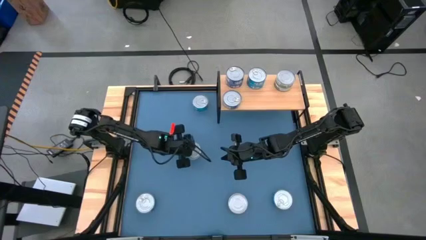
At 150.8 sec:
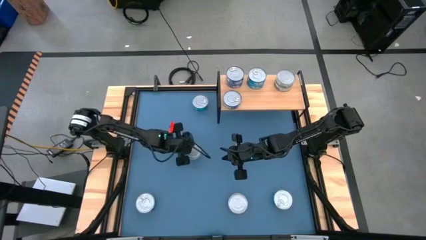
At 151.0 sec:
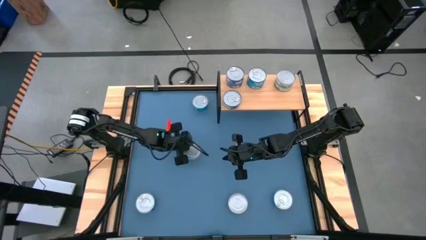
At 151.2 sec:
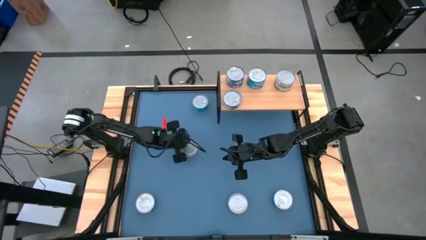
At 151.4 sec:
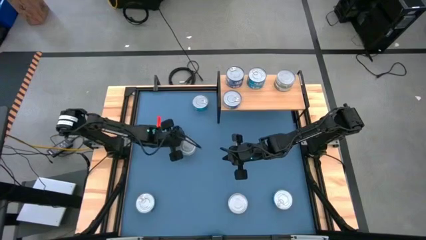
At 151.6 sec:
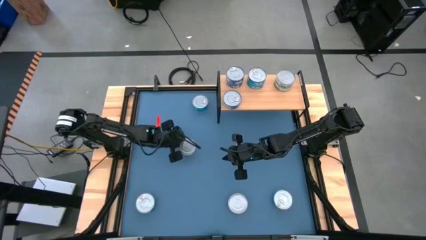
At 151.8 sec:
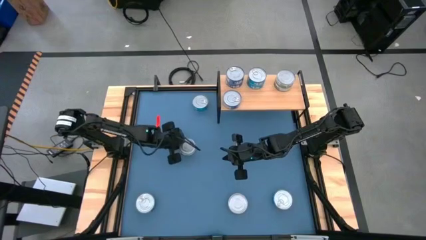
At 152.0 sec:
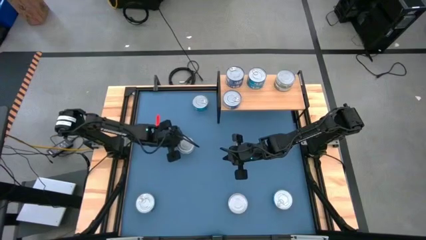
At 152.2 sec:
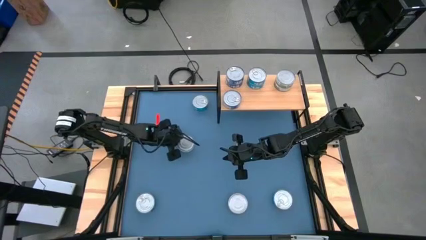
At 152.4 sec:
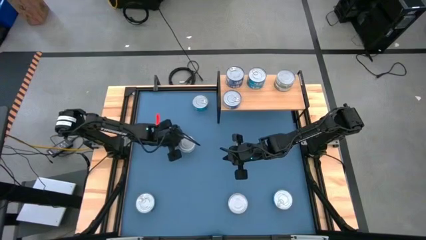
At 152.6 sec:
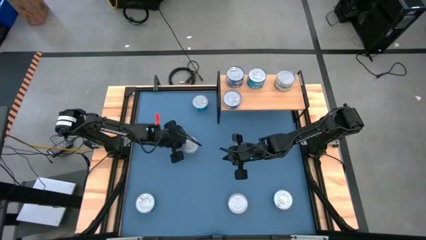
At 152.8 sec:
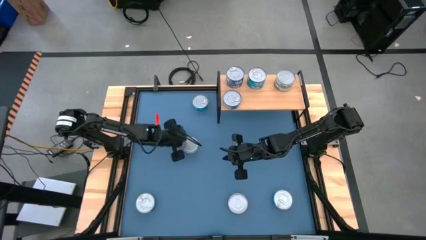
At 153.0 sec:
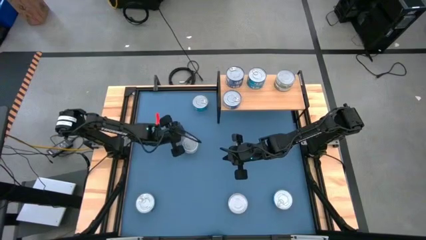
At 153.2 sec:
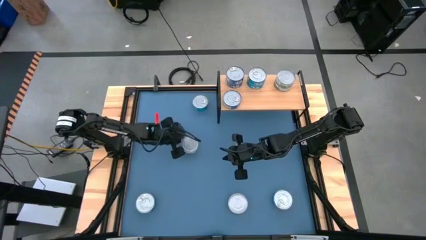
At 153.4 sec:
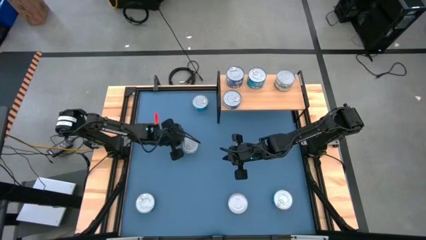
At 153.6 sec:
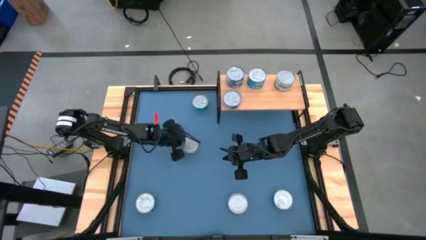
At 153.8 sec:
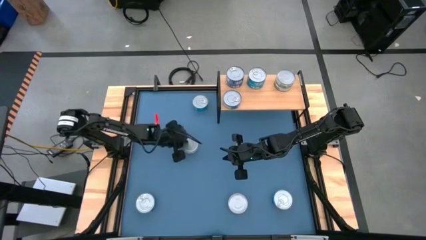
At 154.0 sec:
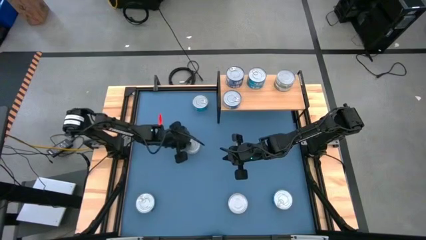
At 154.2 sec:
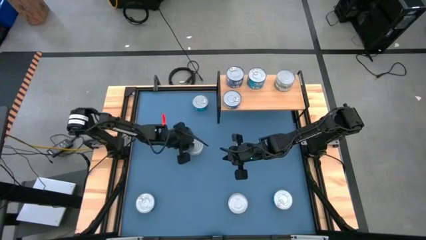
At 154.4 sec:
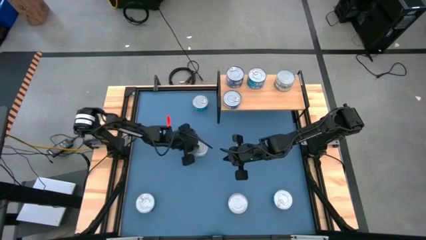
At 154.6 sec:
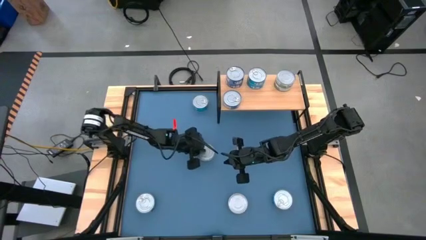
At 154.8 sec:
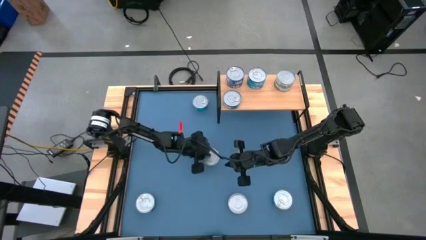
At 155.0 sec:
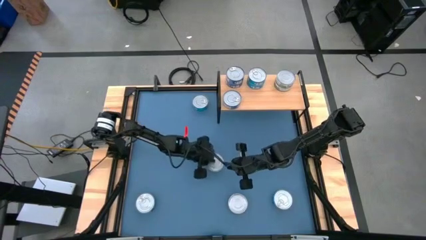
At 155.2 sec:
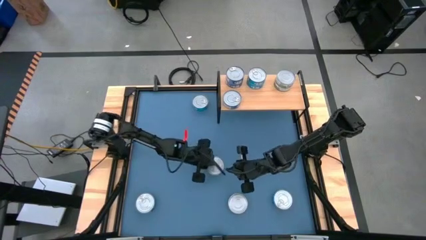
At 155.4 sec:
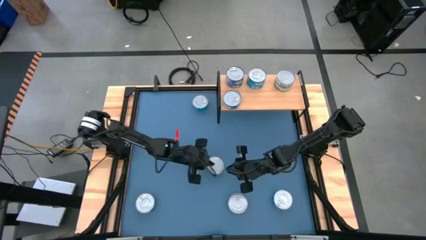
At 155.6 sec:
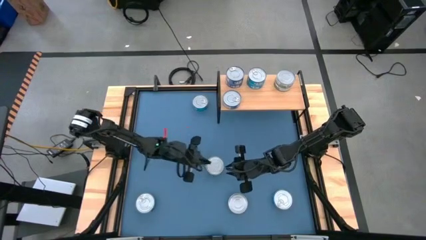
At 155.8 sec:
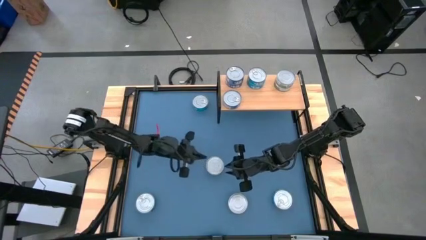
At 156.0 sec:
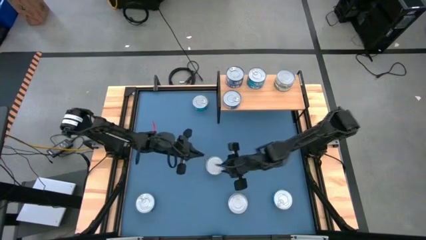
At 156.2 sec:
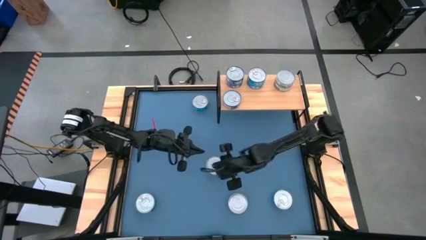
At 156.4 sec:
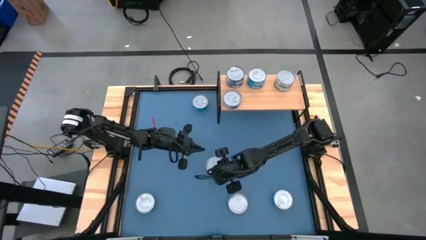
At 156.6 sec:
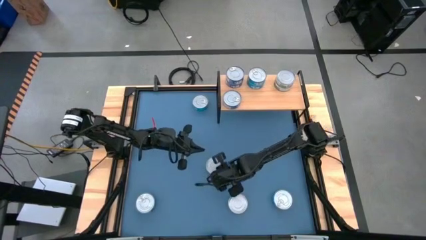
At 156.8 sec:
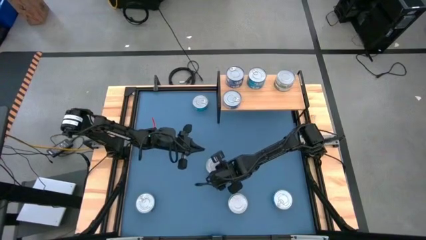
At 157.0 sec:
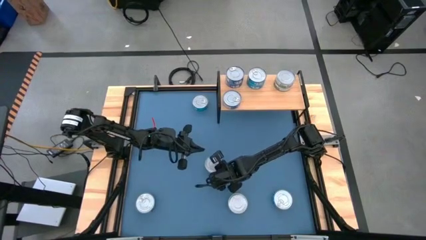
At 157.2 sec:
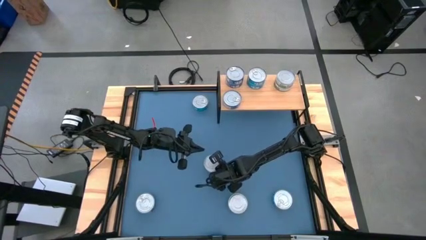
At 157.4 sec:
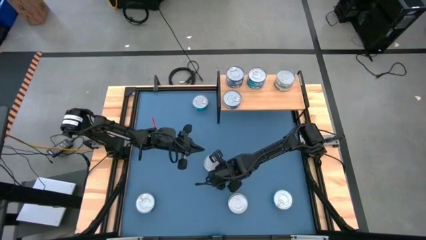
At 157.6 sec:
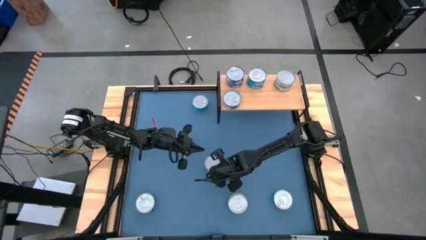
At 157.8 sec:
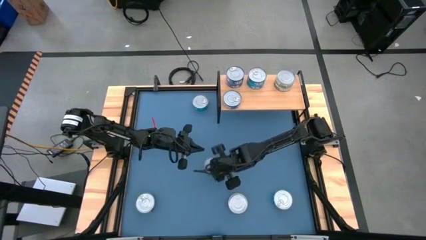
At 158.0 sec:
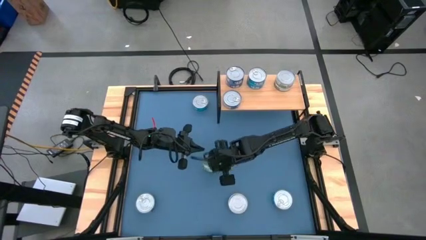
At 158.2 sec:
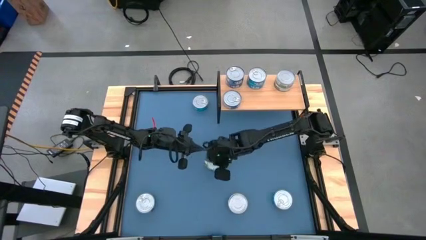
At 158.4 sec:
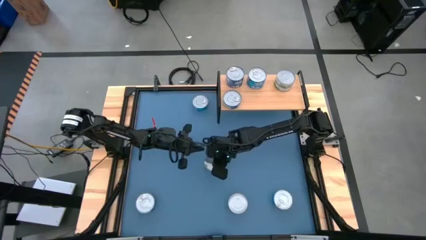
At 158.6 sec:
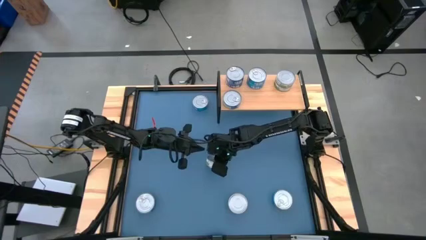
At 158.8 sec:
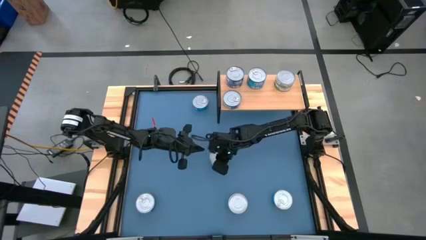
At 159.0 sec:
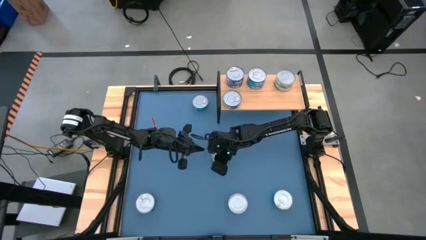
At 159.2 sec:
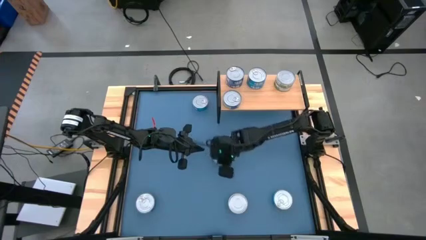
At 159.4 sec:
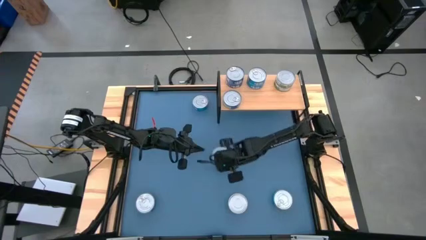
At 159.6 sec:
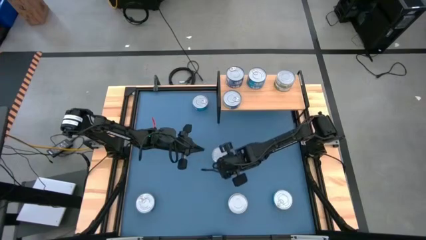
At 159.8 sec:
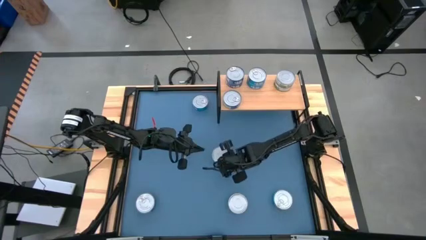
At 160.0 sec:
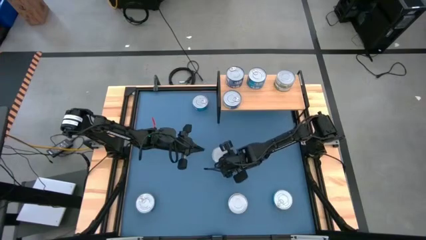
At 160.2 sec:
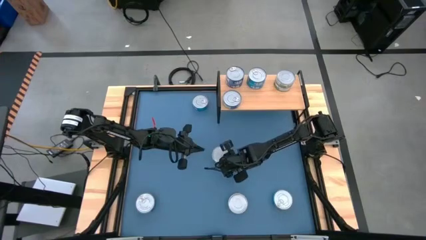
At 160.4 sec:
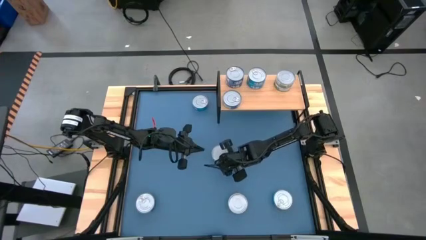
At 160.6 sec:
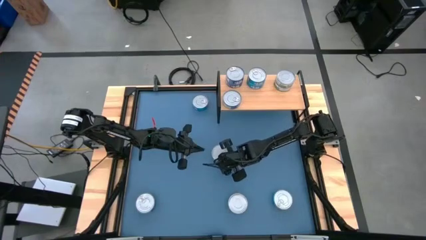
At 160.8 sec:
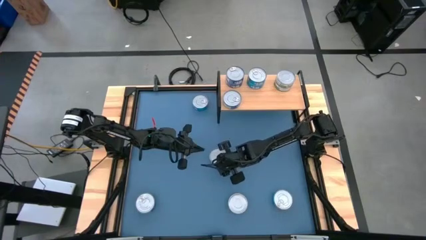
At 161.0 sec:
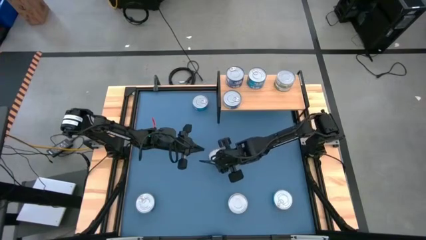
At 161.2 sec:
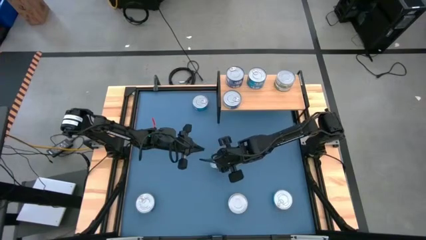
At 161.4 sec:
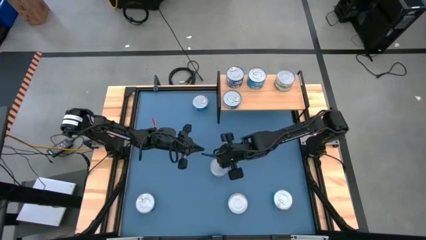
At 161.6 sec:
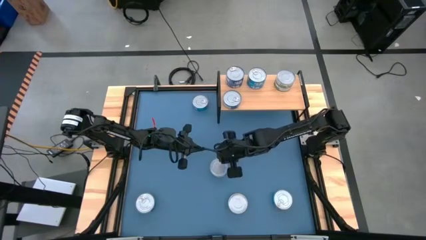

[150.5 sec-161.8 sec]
Task: Stack canned seafood by type on shelf
Put the left green tuna can on the shelf aligned with the other green tuna cans on the shelf

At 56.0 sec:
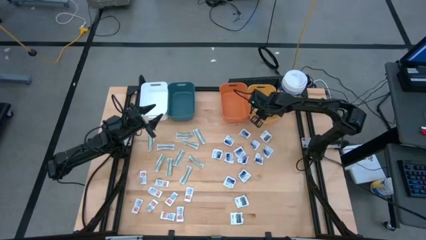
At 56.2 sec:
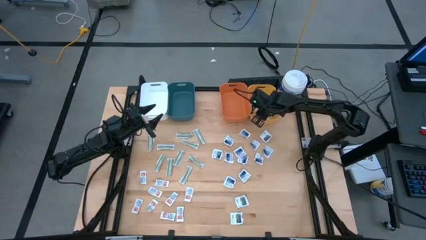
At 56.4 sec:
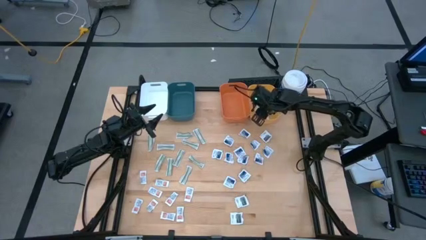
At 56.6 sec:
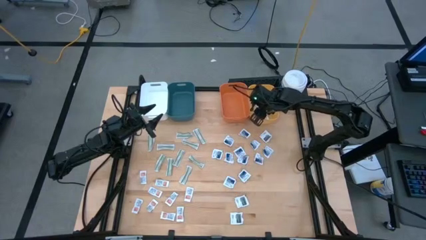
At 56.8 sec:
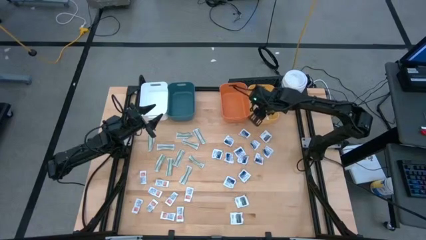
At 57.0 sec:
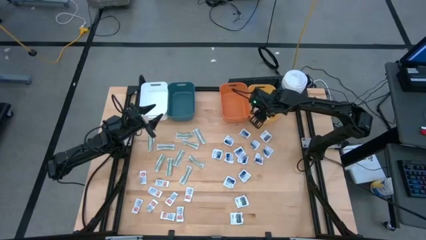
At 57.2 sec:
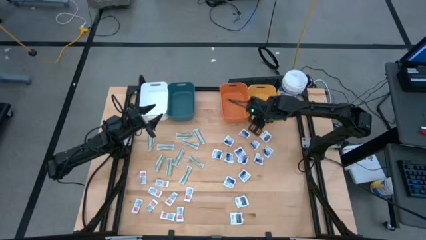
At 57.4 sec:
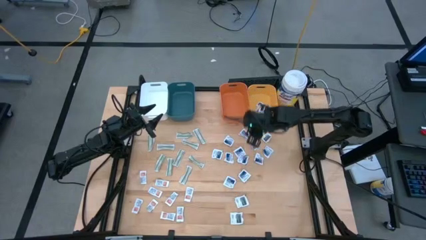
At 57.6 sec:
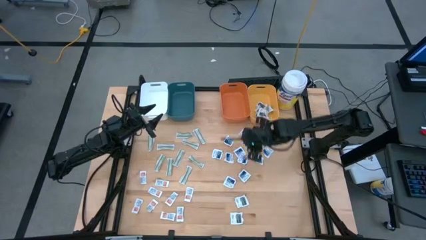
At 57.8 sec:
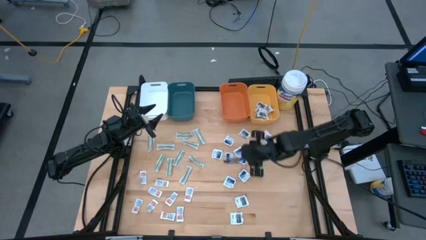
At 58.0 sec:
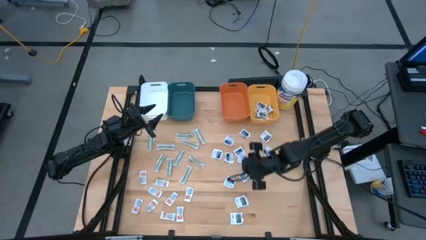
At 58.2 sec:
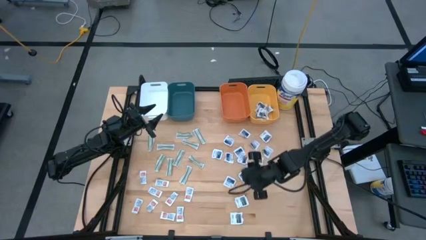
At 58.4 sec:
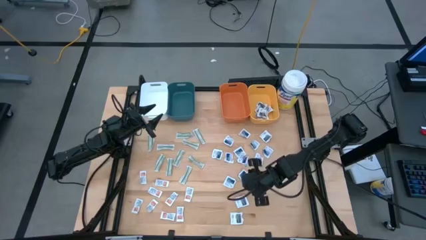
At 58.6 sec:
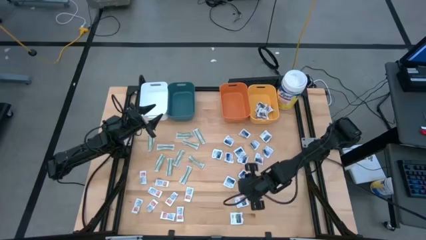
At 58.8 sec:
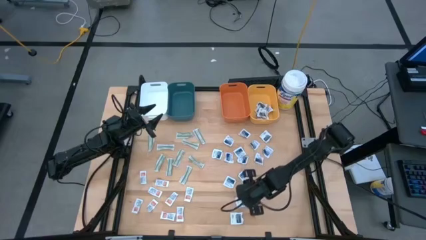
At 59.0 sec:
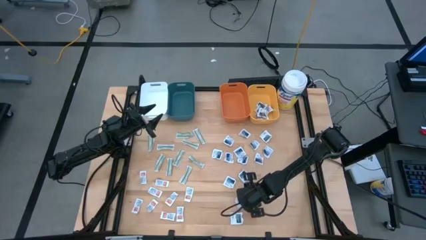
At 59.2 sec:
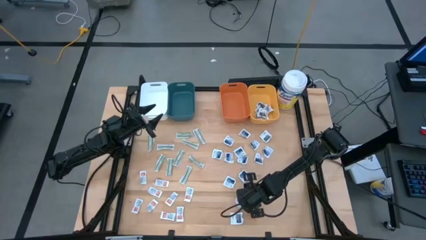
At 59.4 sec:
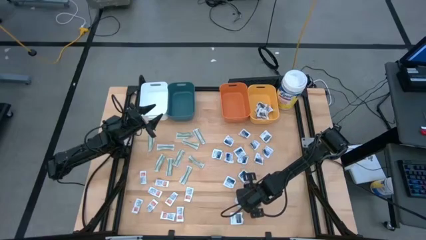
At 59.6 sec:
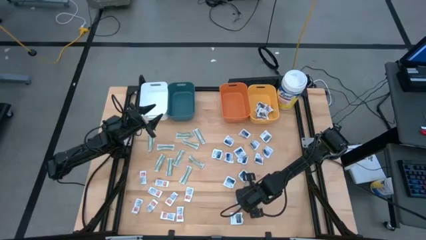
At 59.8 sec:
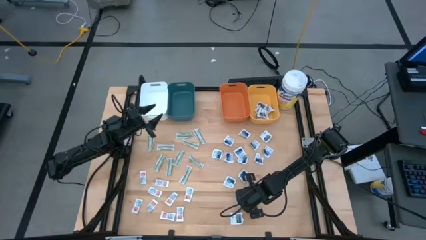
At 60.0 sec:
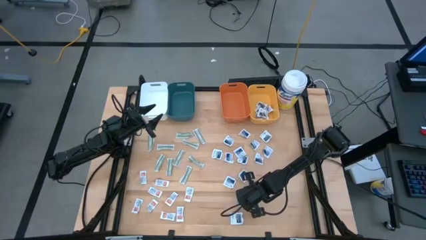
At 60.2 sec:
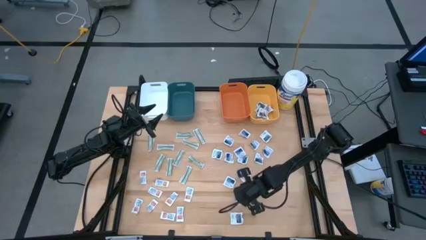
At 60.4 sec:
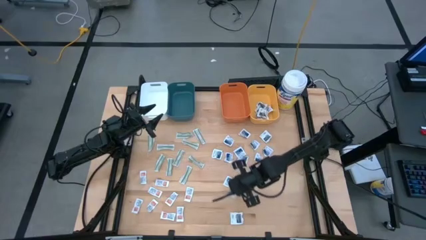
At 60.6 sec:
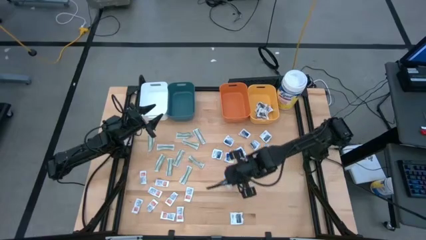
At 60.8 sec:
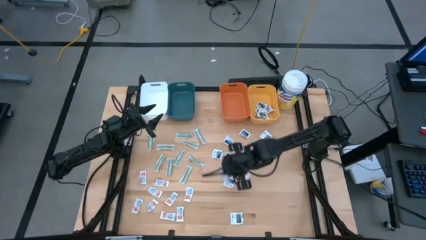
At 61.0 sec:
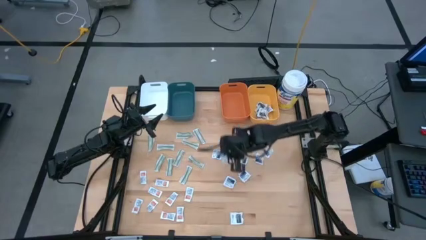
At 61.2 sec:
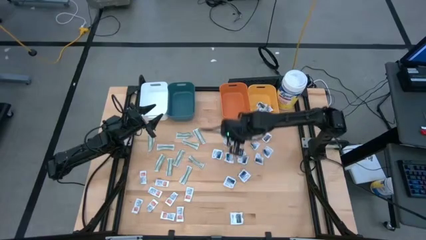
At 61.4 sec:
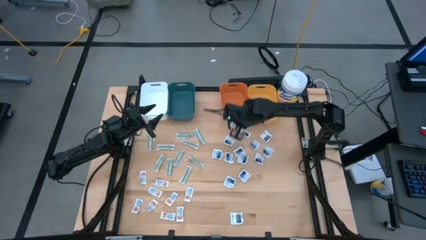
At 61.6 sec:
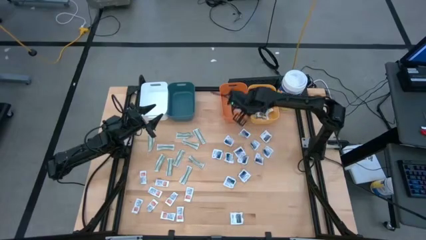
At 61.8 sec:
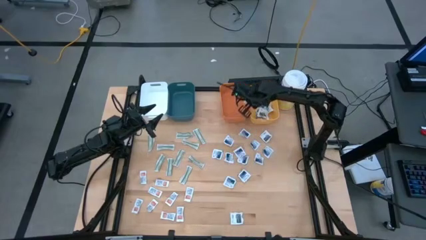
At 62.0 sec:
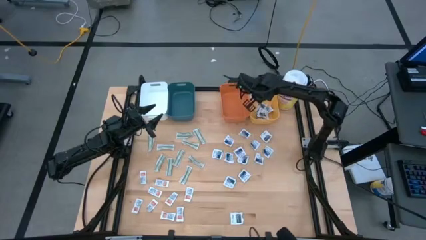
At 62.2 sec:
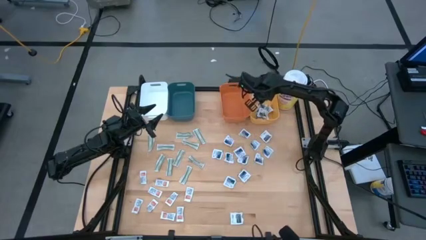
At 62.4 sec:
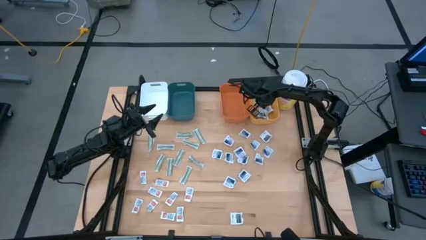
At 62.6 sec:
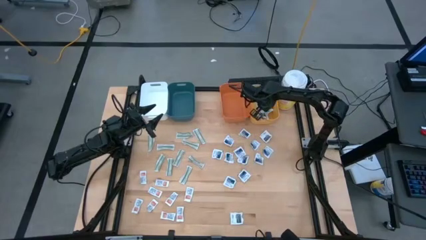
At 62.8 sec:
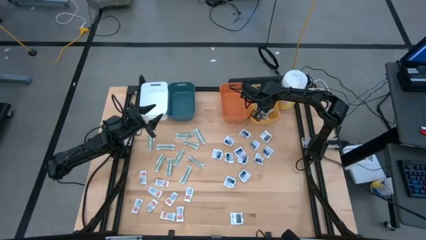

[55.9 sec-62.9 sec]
Task: Pick & Place First Aid Supplies
Put the towelette pack into the yellow bin
